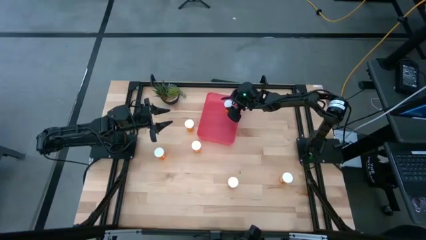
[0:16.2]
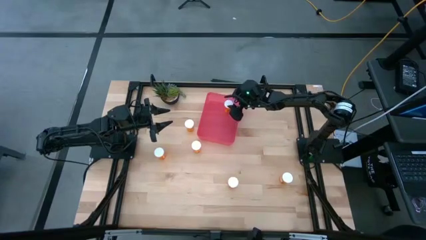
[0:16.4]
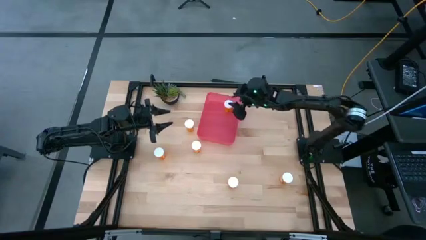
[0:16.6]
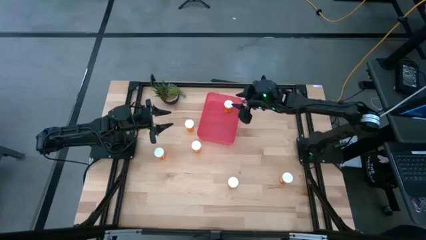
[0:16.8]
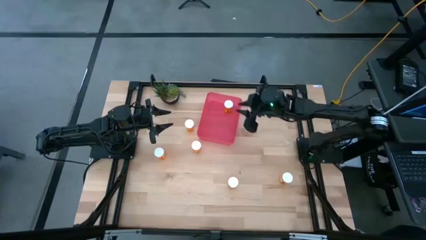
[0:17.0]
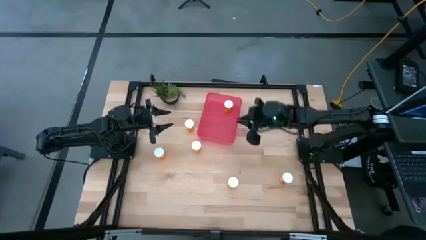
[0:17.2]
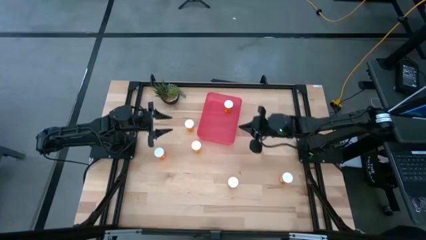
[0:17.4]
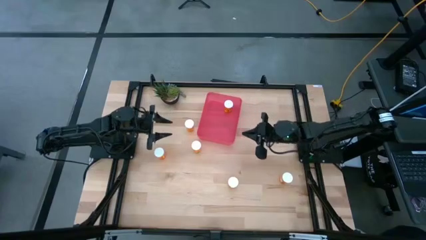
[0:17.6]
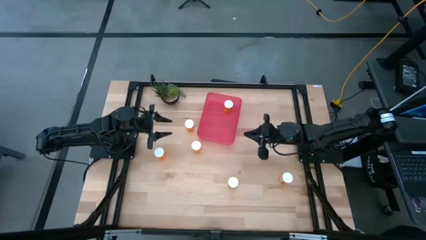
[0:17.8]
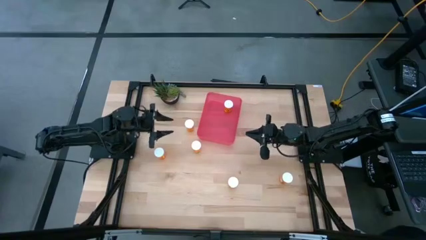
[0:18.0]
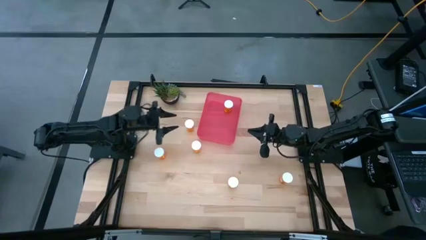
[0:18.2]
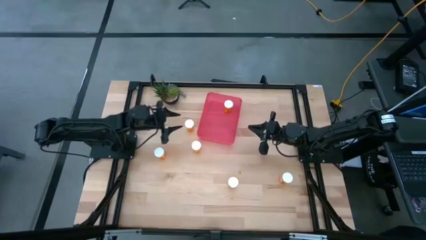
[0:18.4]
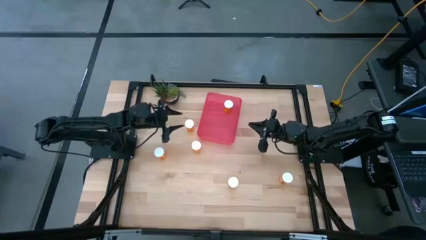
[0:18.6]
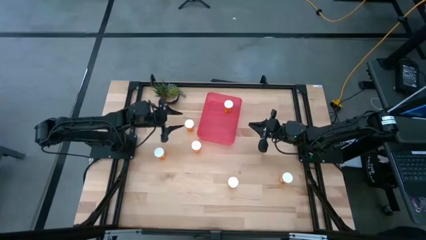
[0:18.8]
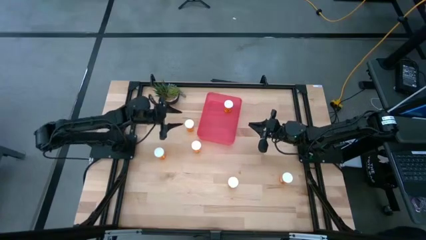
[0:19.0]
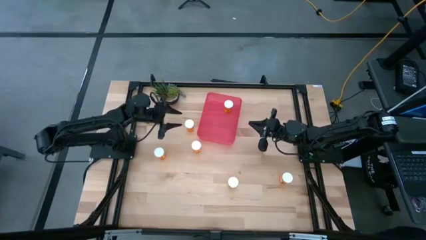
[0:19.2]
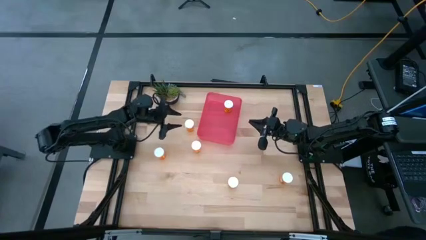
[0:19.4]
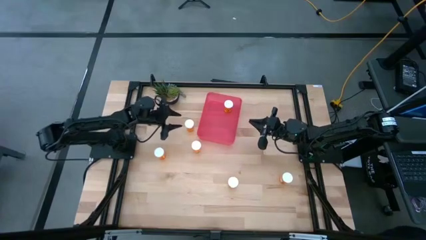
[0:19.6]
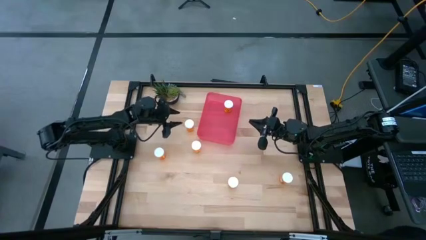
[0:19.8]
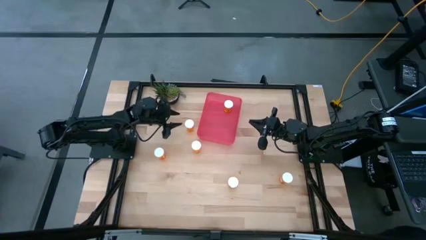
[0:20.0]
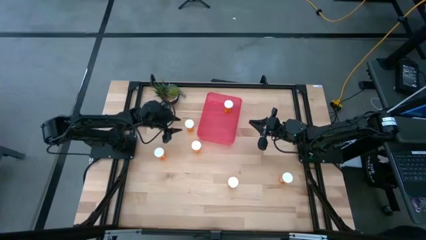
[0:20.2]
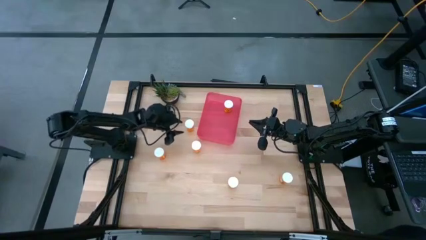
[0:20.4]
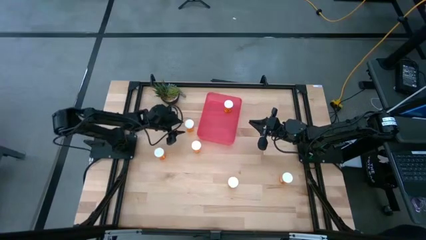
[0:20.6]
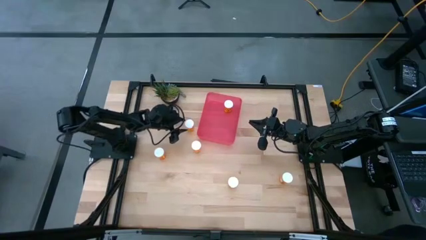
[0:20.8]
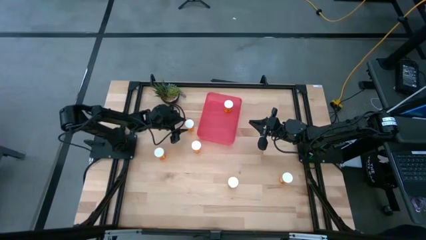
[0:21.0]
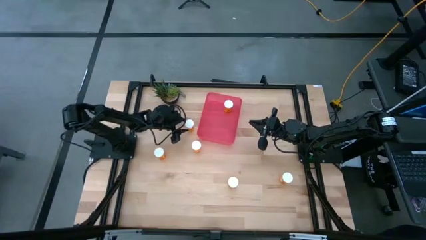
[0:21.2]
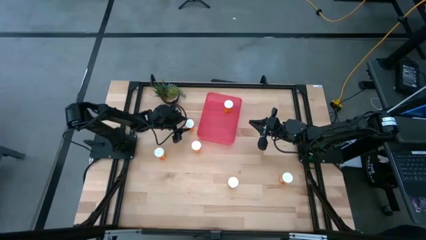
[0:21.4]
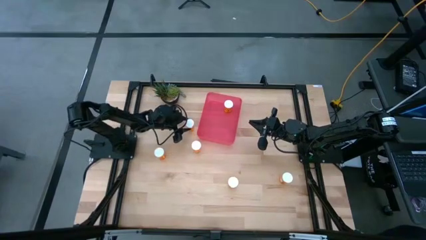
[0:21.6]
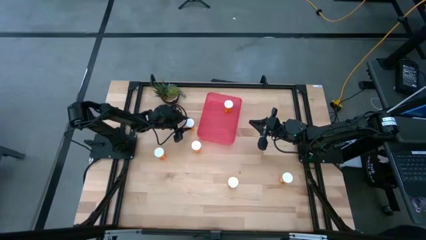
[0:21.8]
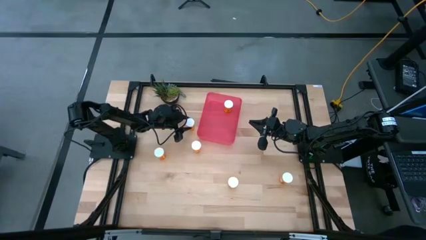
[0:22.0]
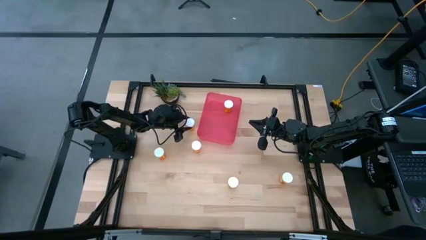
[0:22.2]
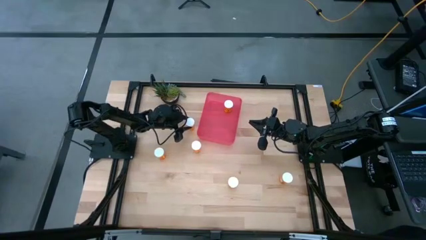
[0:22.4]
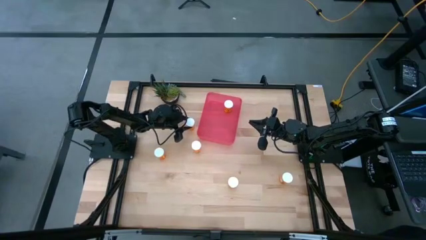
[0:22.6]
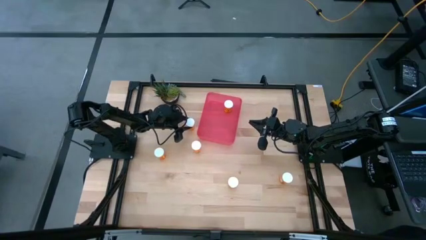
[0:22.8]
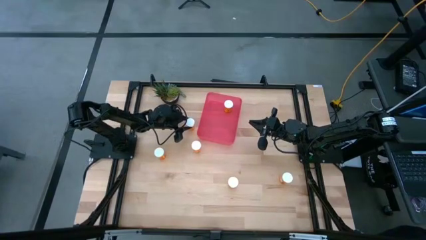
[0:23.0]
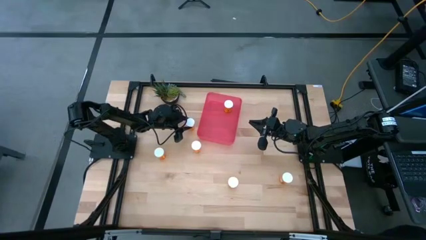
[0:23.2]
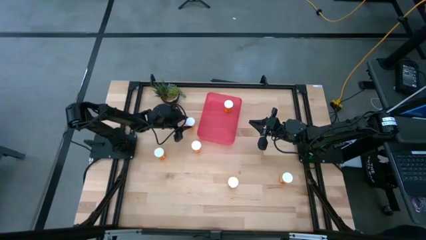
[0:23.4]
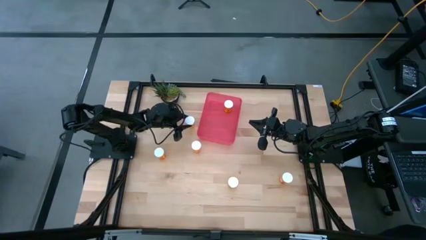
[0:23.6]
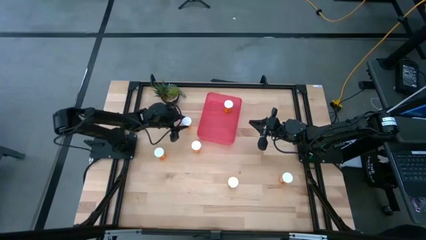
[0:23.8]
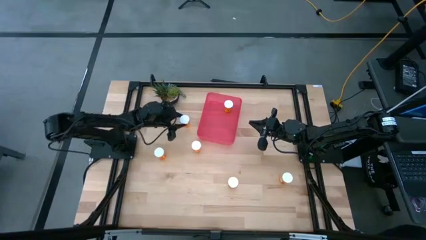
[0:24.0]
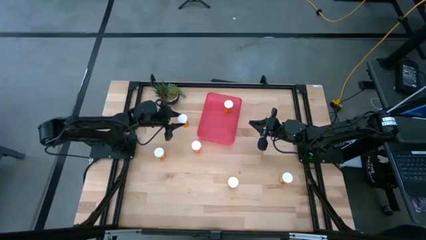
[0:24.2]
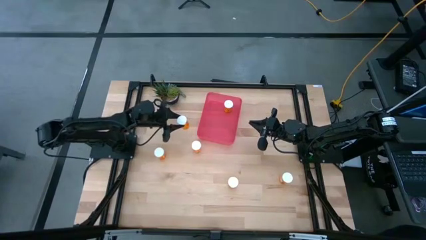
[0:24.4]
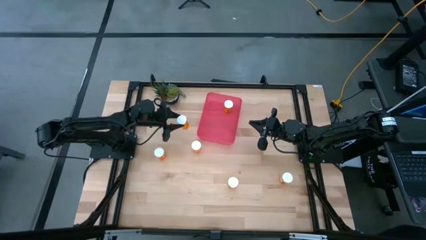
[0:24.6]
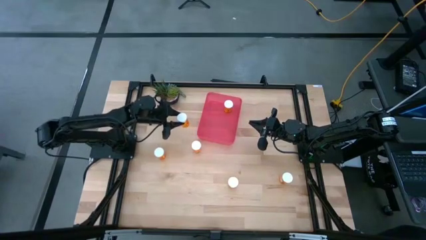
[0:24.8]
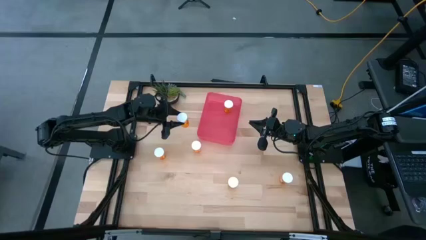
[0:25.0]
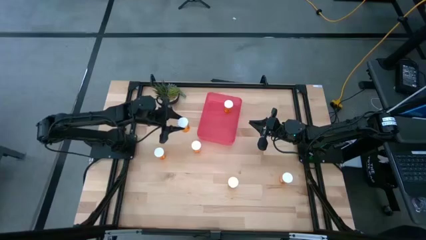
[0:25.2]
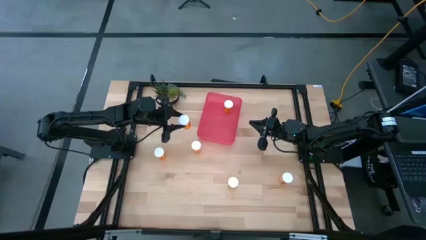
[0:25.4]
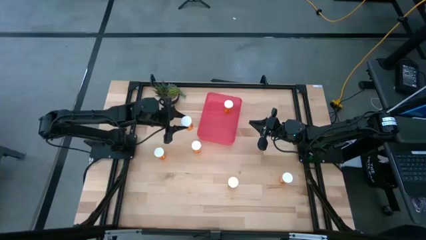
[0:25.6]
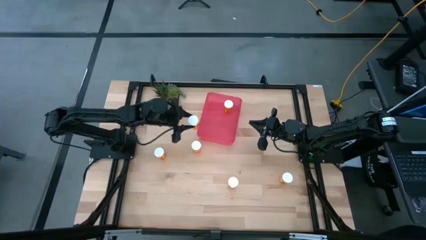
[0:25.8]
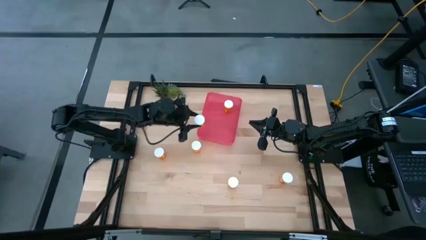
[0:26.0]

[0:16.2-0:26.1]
Task: Pick and place pill bottles into a basket
Put the orange pill bottle into the red bin

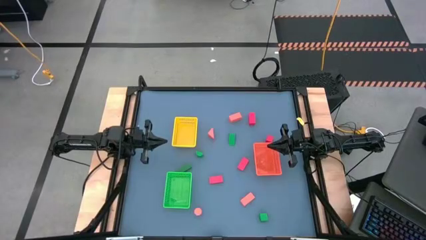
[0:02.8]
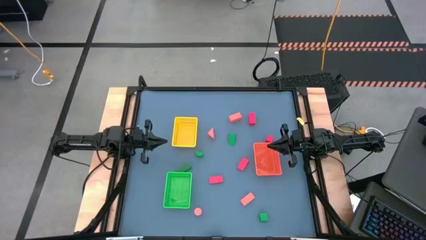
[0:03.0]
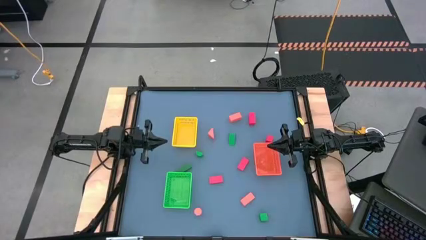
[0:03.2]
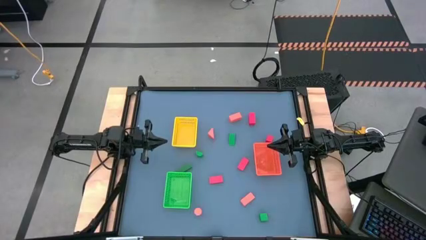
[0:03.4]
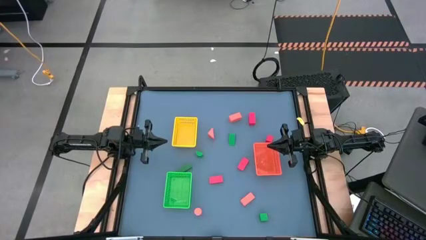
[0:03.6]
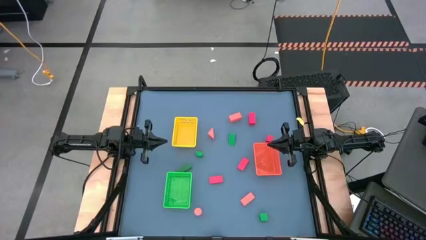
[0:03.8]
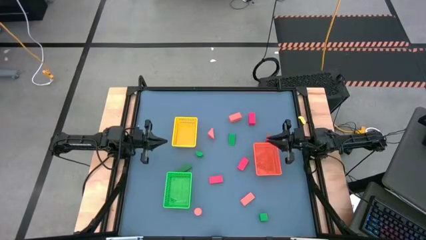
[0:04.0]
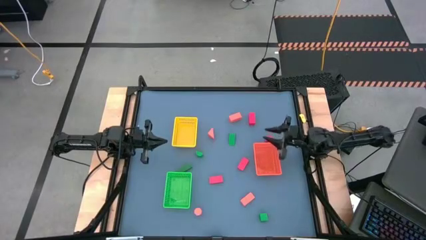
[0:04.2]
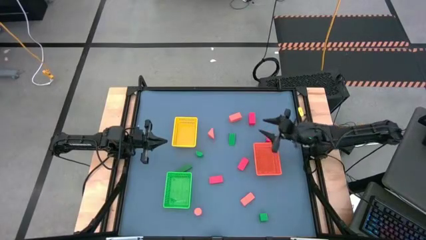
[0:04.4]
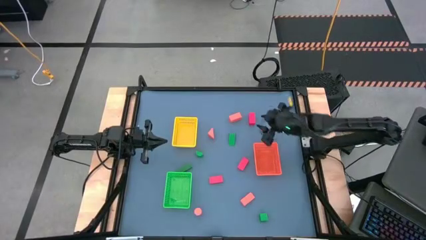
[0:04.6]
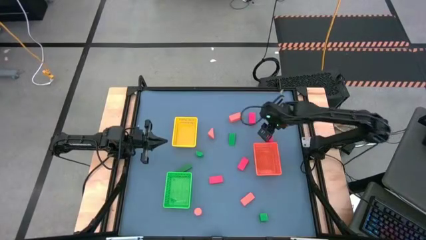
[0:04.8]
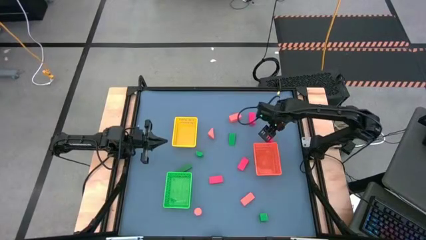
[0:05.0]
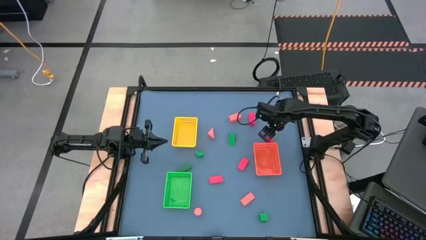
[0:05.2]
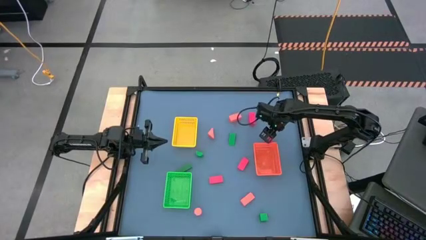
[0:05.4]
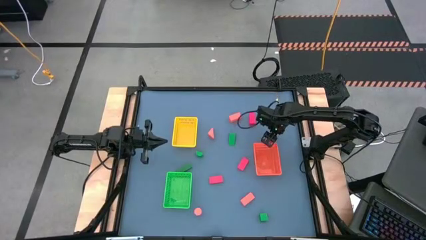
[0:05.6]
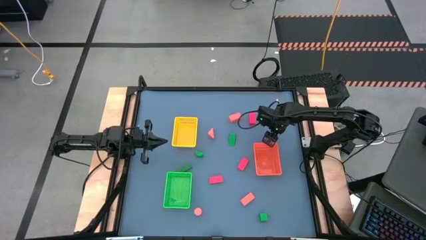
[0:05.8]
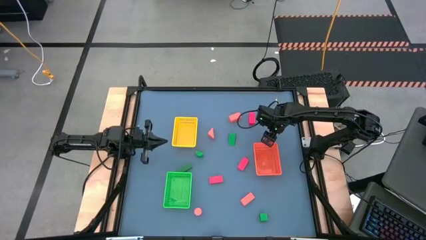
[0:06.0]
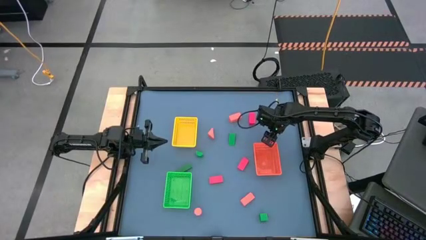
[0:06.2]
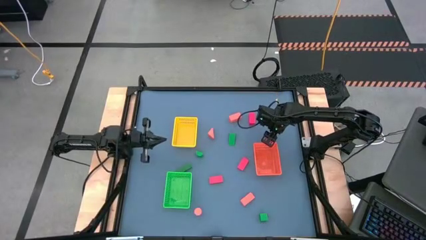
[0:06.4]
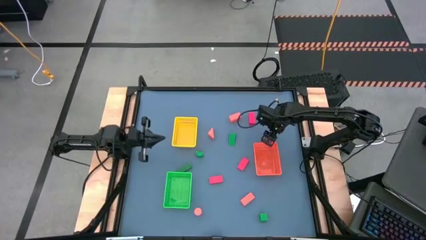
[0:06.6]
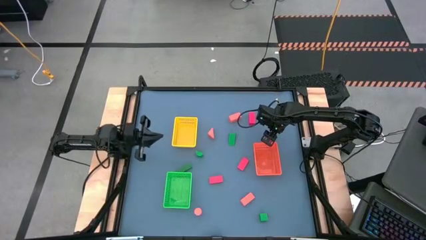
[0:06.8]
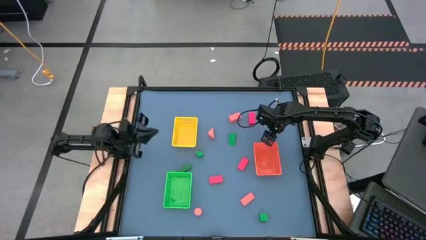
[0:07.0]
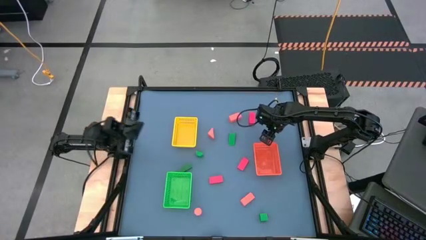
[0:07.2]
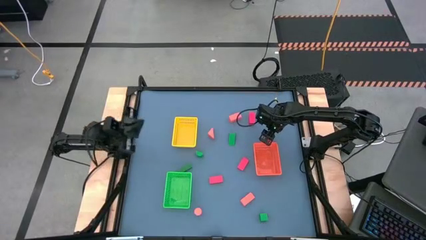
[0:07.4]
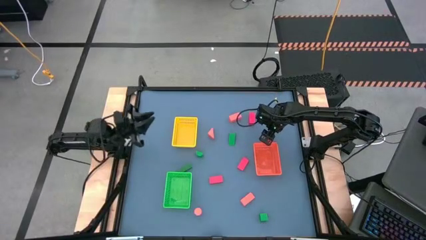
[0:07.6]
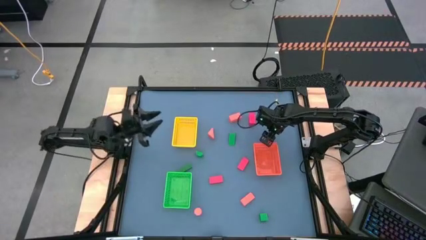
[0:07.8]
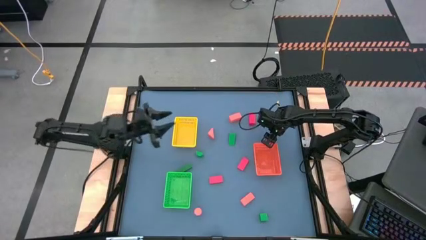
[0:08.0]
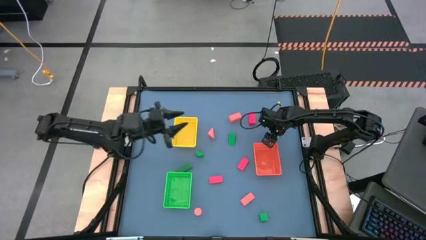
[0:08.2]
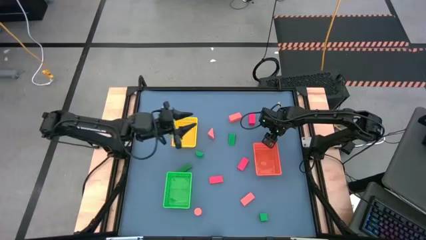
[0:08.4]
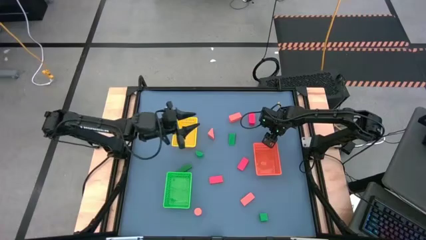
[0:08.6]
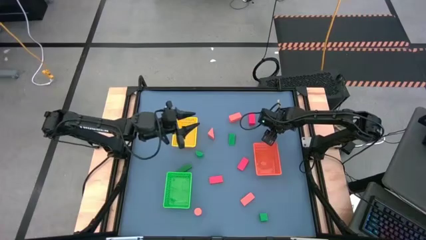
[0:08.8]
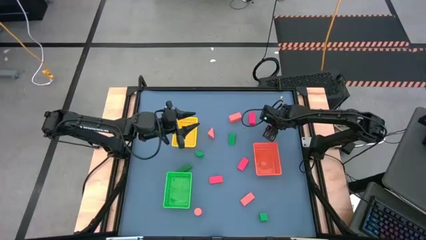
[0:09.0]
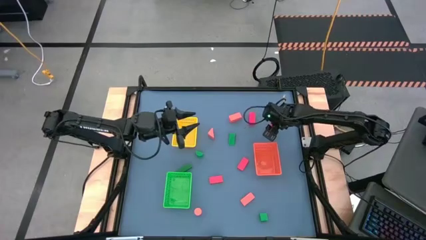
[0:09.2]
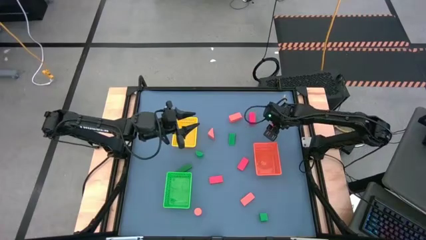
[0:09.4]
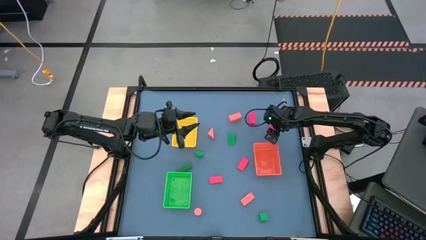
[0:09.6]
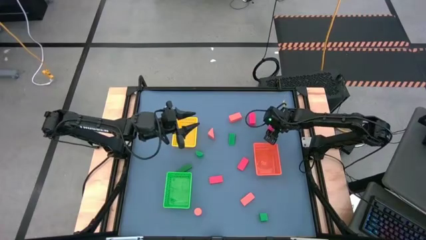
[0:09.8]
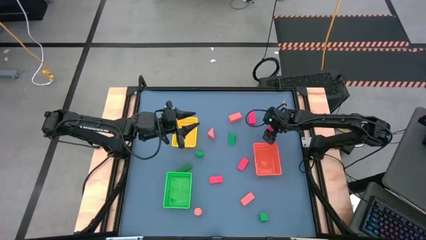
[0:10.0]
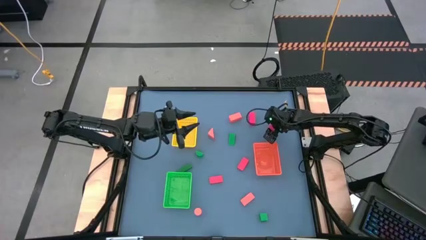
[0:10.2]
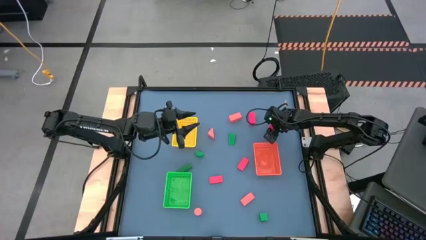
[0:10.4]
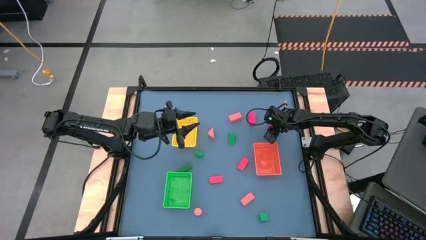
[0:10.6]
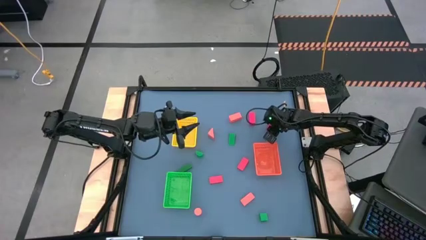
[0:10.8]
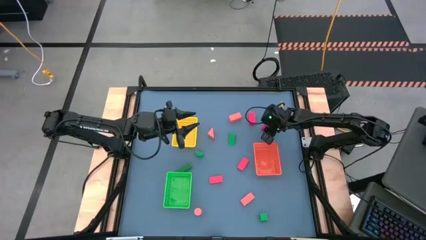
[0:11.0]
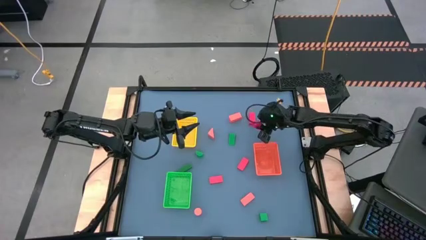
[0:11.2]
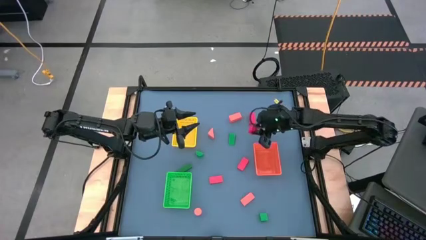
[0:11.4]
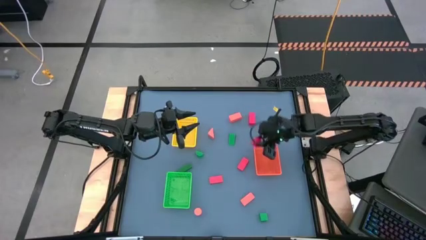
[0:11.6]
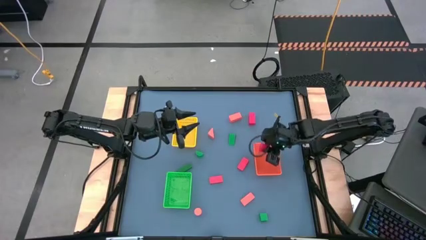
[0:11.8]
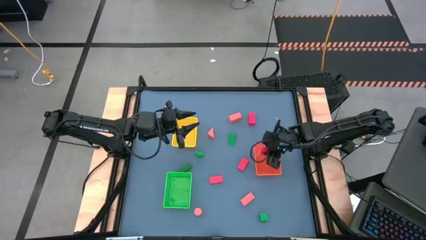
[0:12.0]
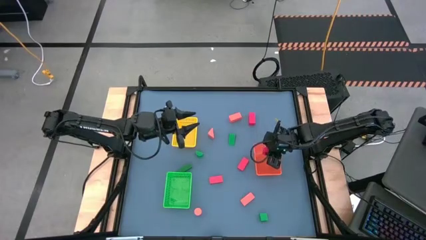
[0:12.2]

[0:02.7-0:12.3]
Task: Sort & place blocks by color
Put the red block into the orange bin
